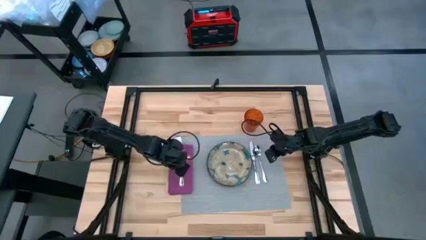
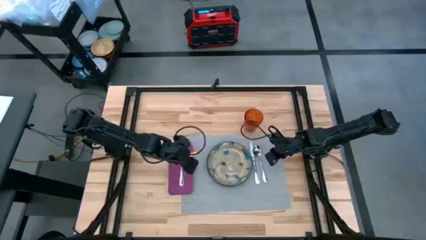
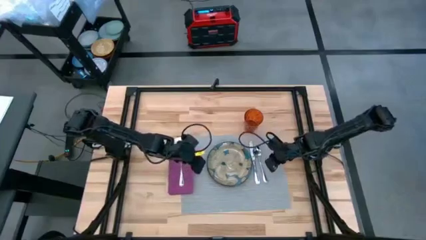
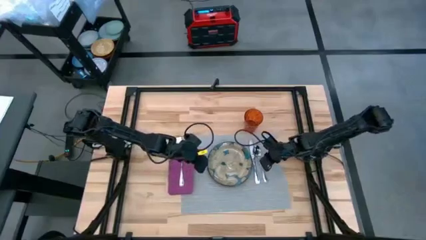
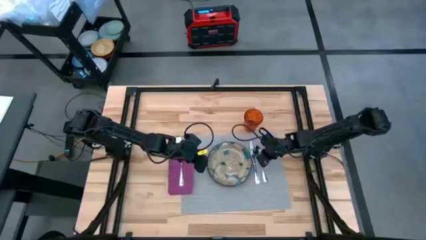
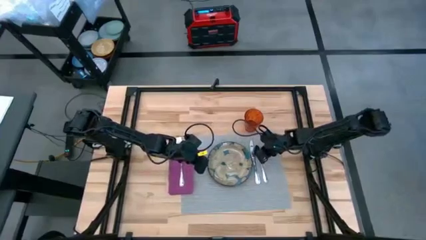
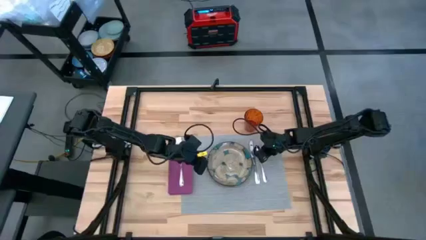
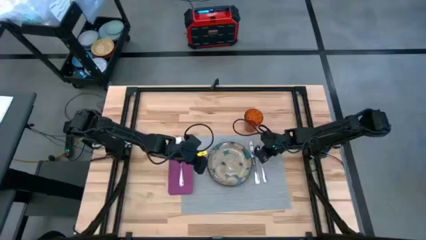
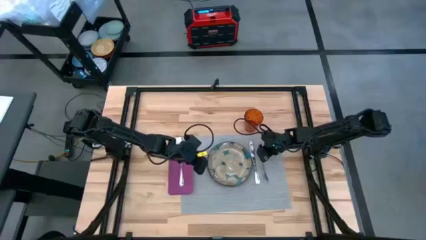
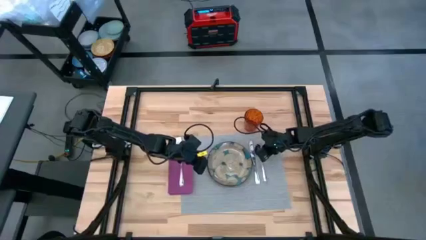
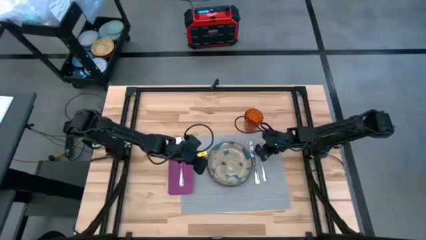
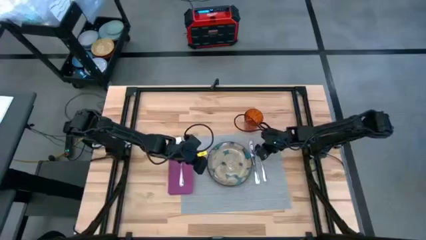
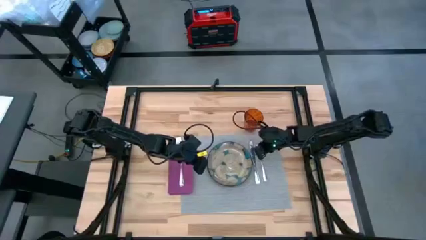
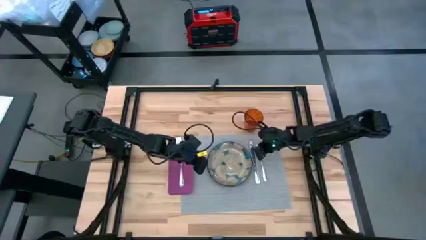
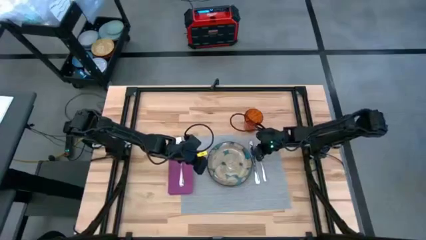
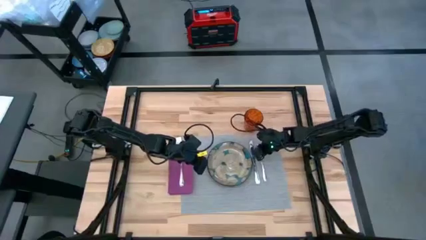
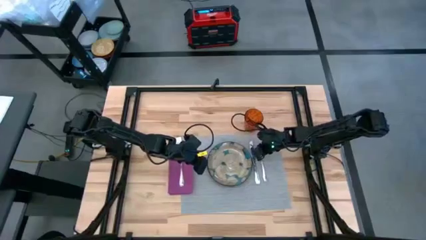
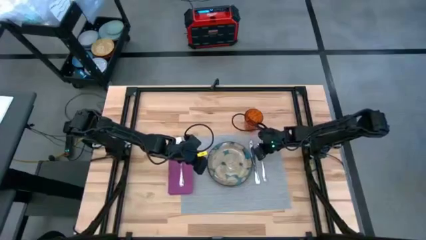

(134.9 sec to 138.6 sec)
Task: Set table place
Adjust the silver spoon on the table mat

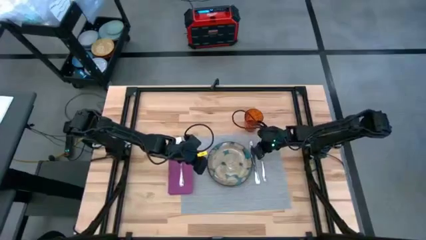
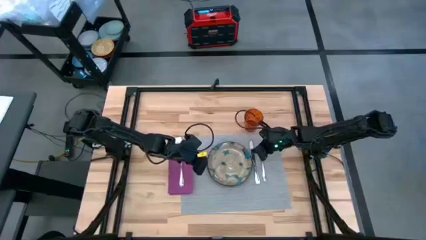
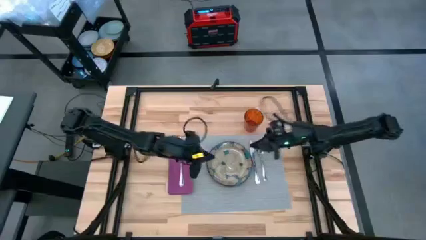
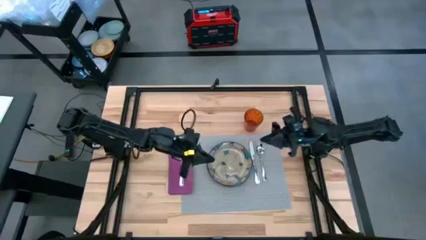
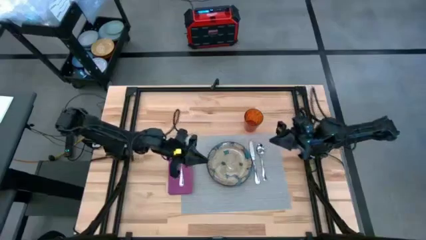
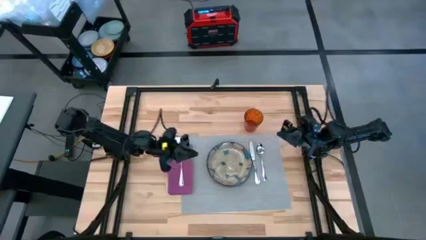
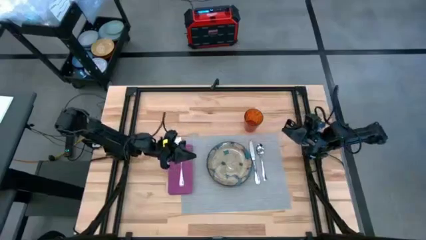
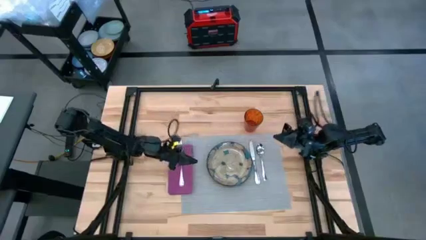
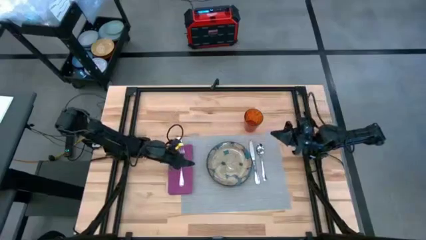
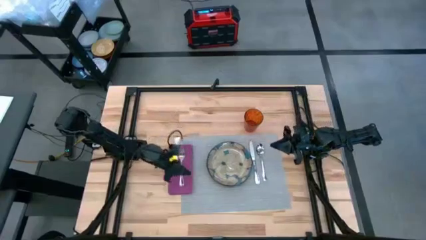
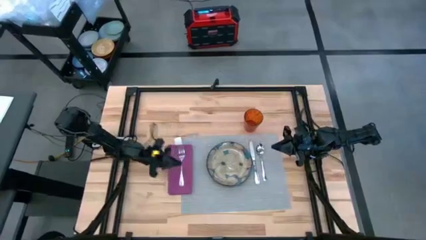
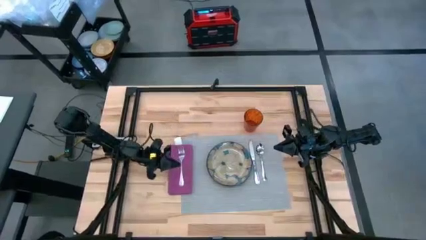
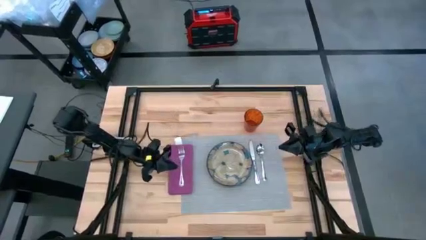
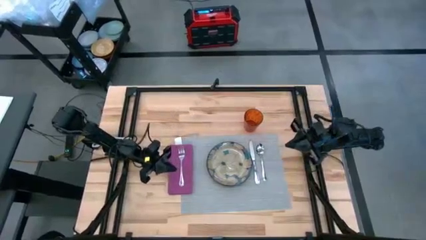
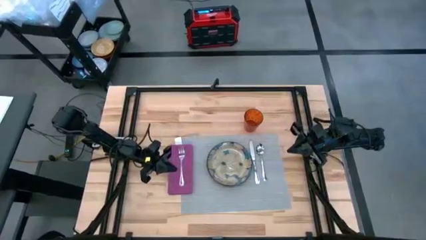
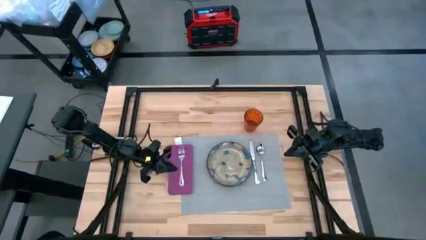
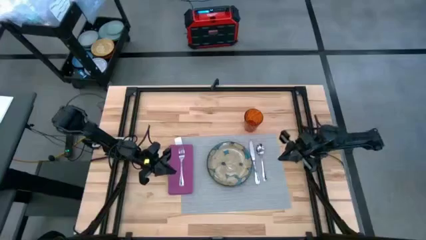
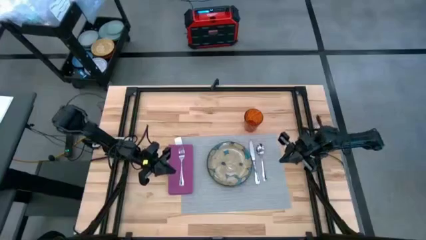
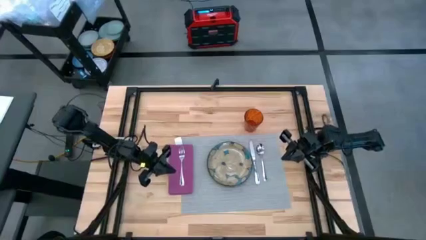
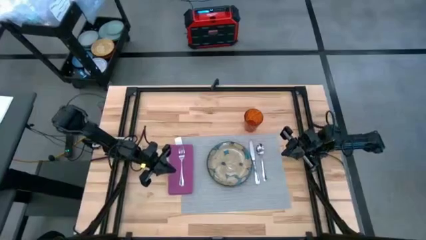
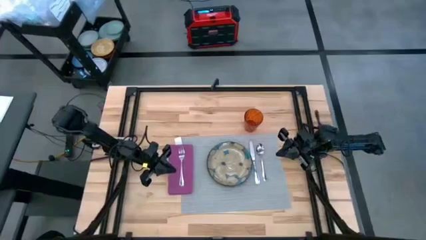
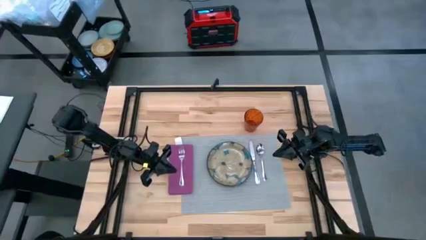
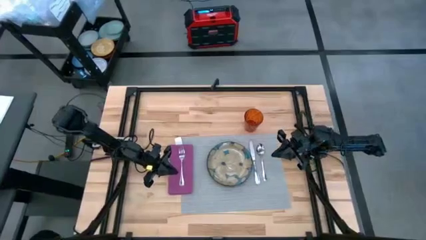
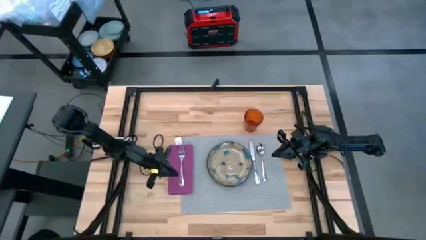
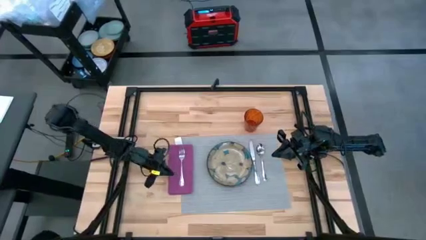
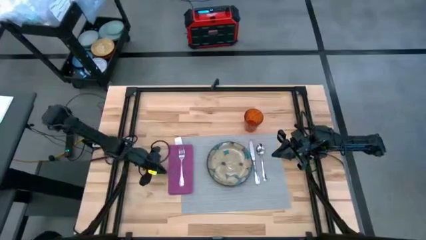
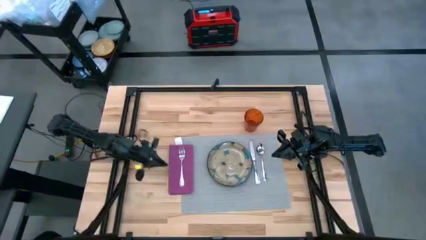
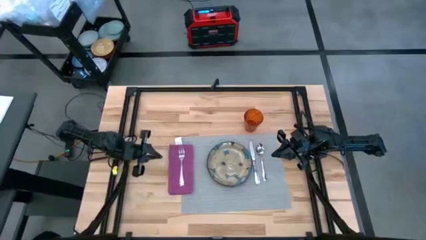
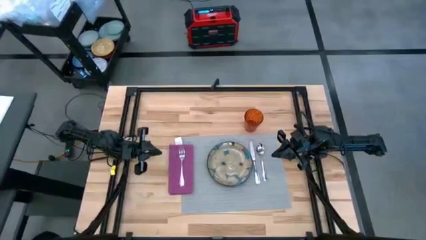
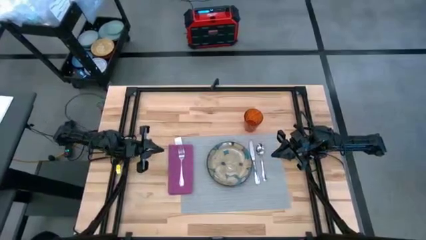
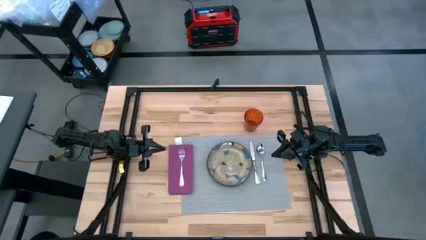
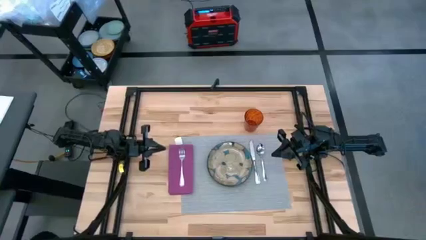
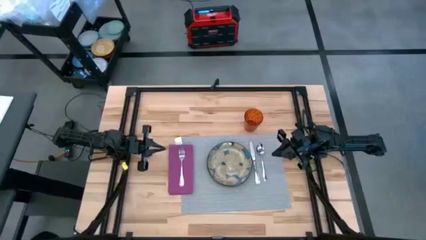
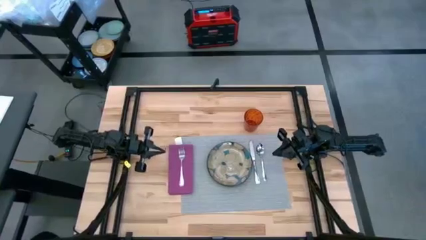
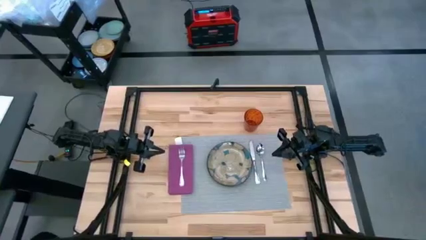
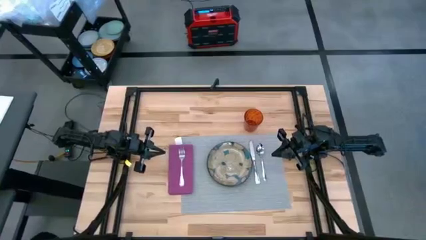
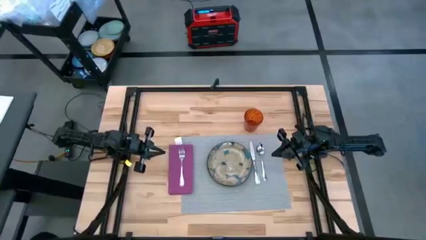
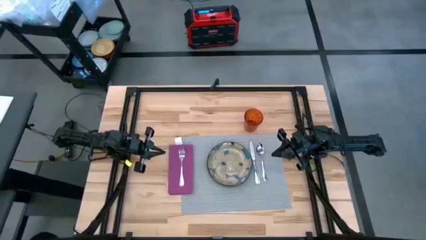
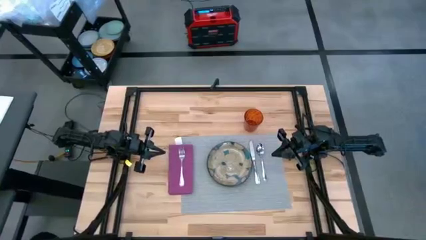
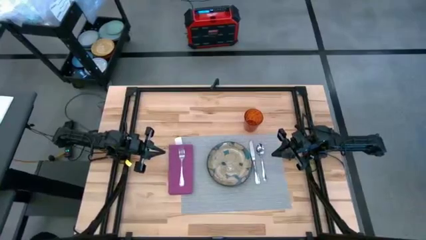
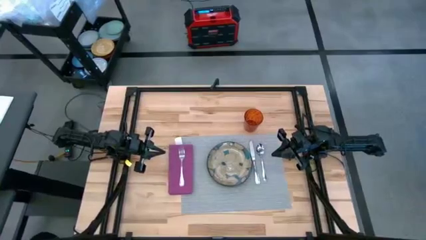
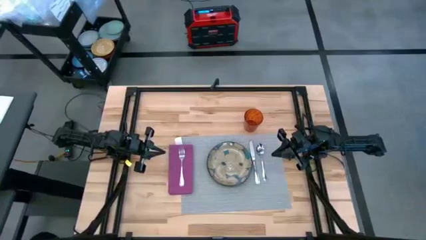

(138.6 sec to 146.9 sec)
Return to Home Position

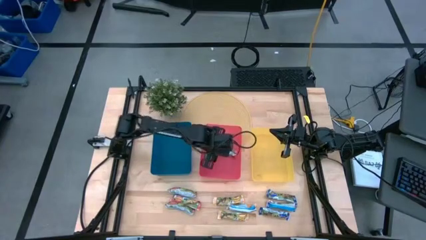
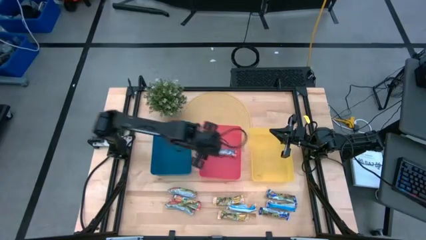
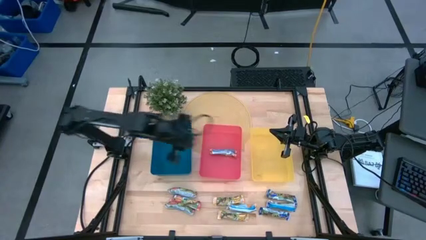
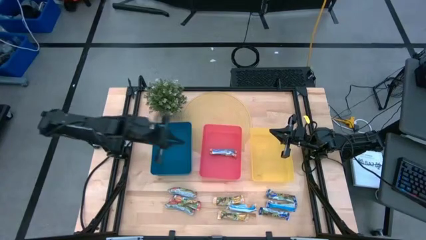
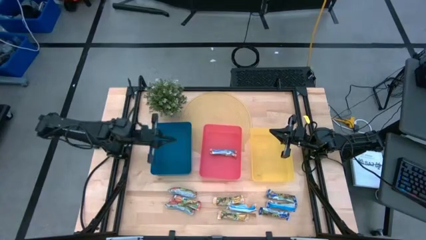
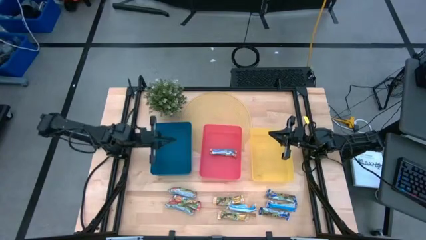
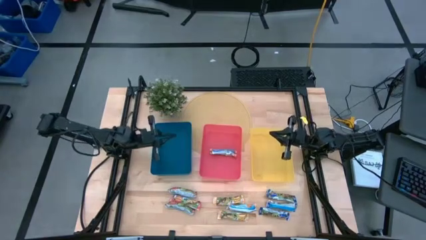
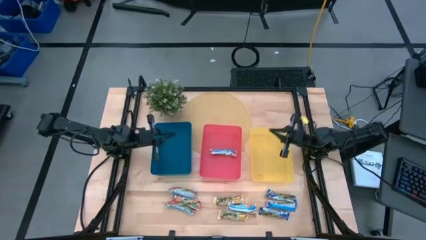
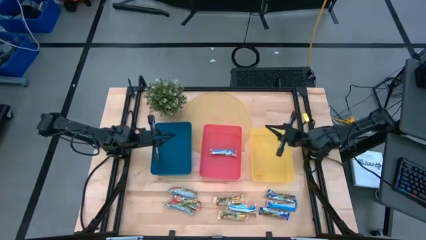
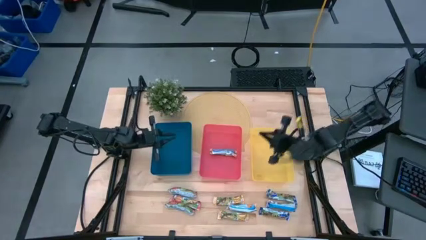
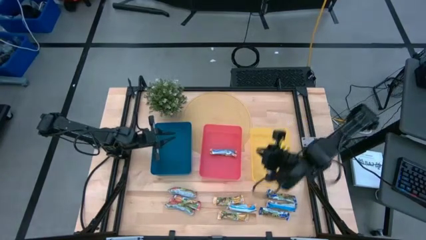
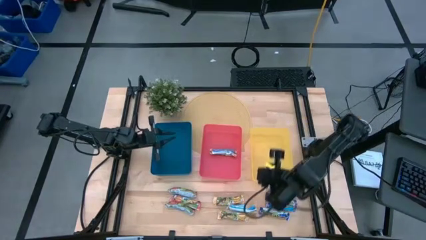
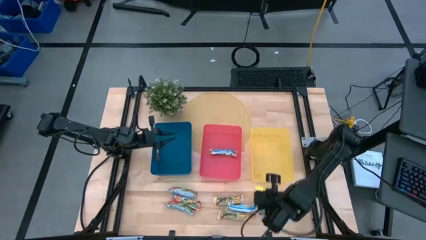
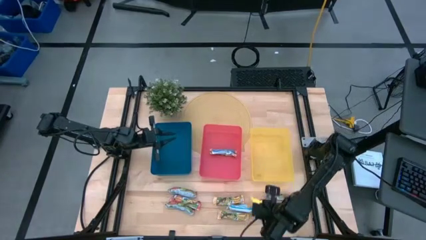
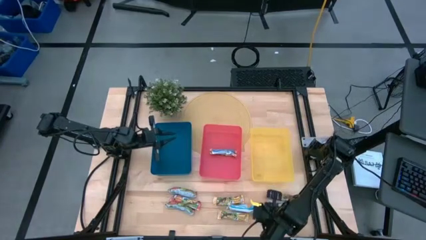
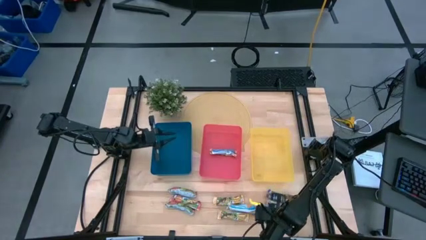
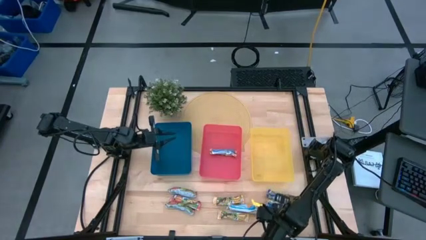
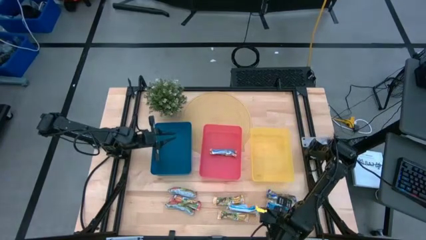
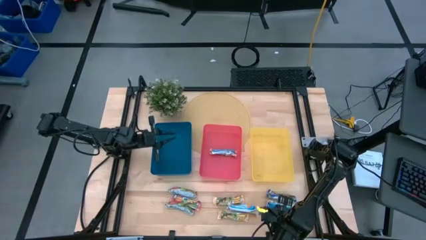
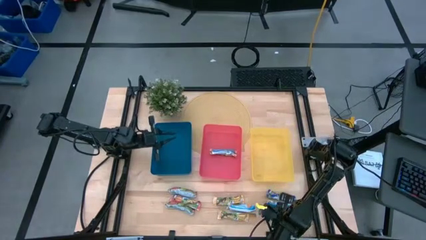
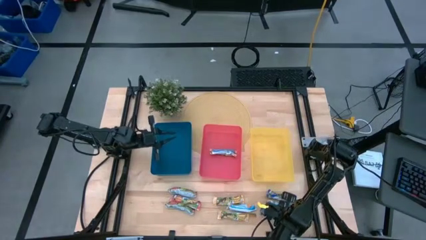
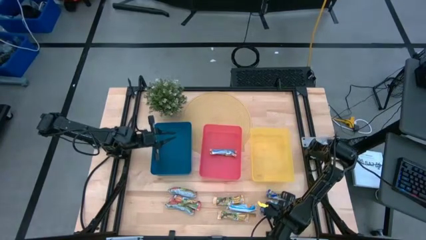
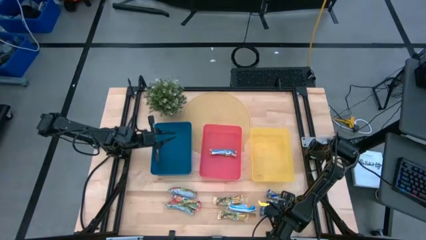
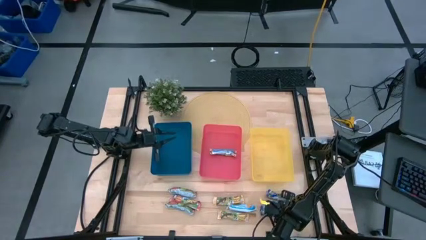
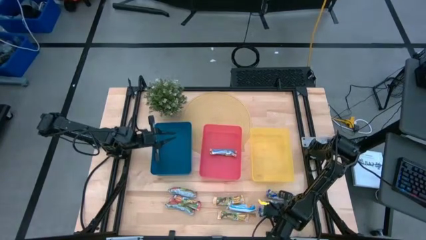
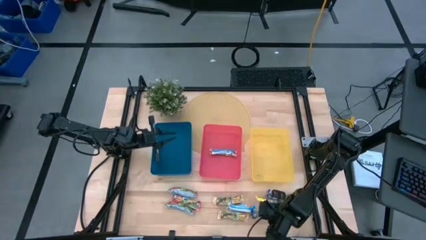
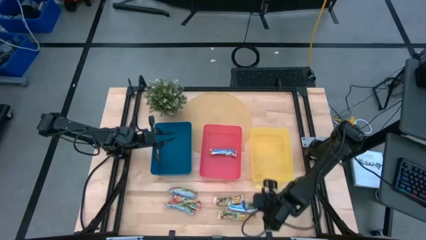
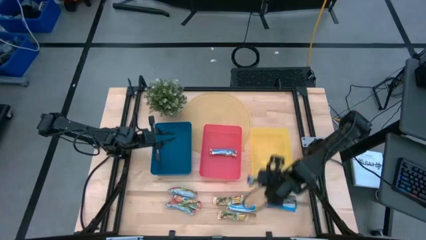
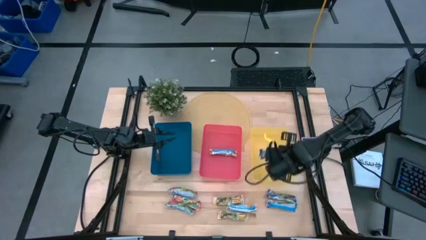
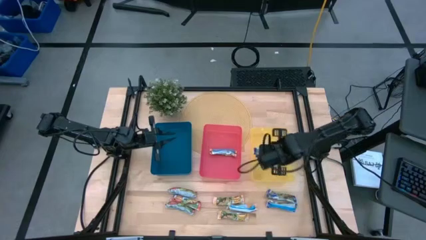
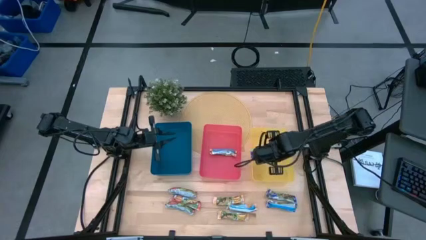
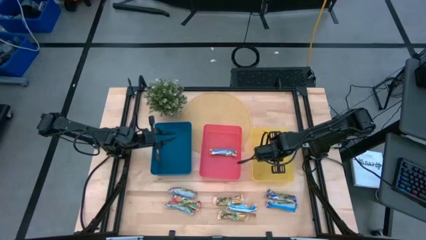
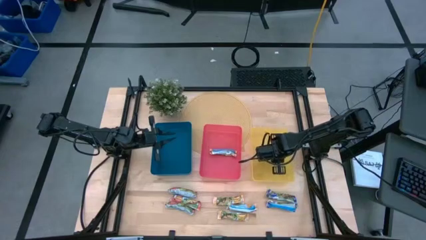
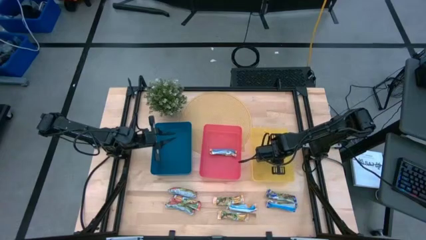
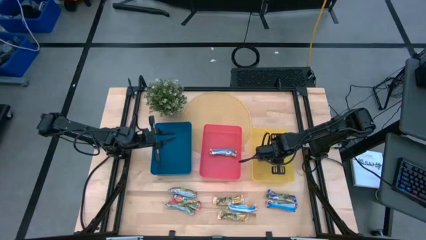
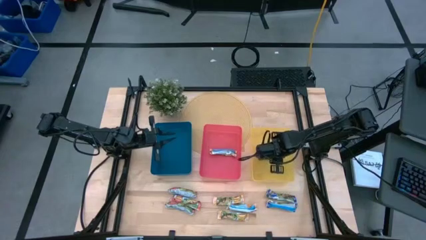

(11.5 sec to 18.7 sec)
Task: Pick and place Granola Bars by type
Put the blue granola bar into the yellow bin
